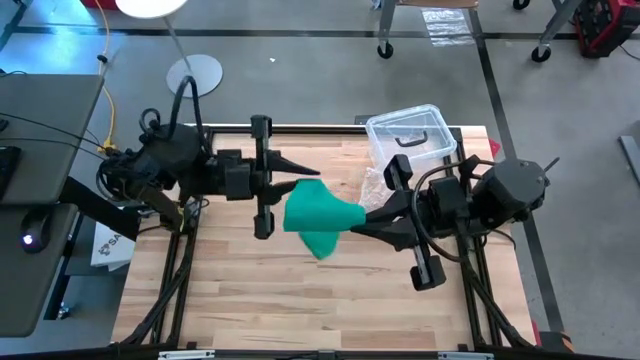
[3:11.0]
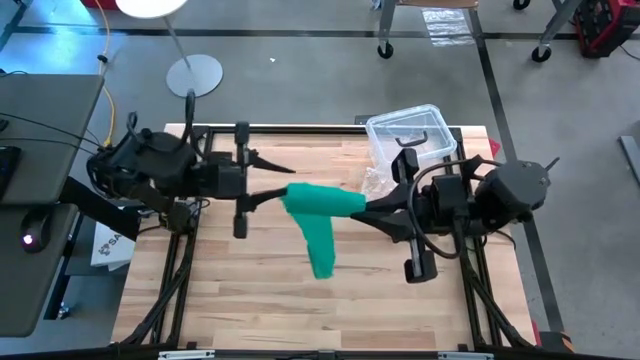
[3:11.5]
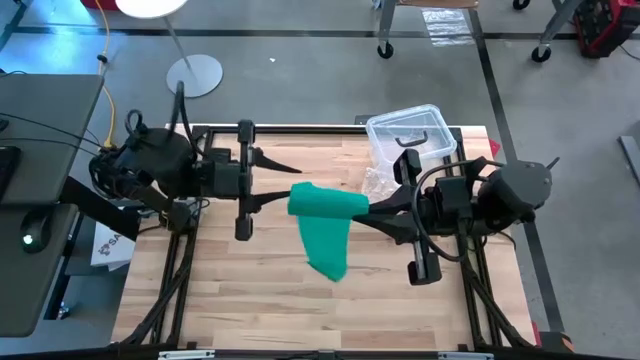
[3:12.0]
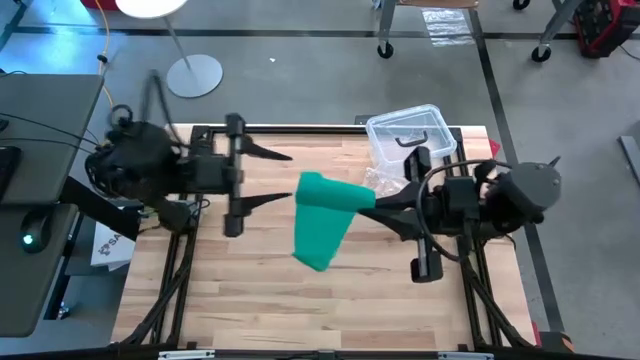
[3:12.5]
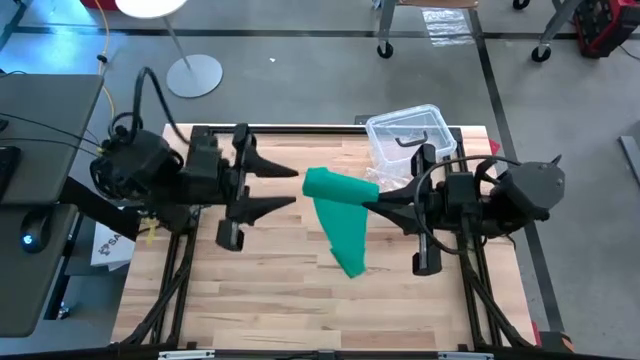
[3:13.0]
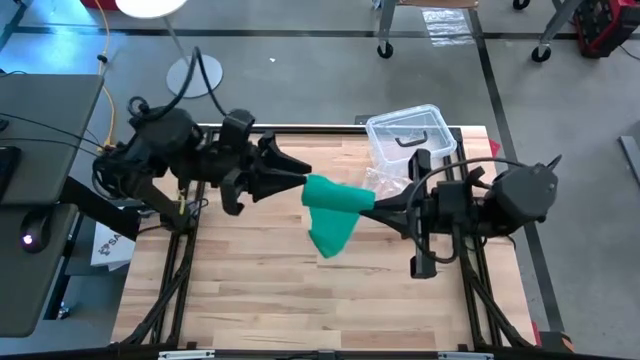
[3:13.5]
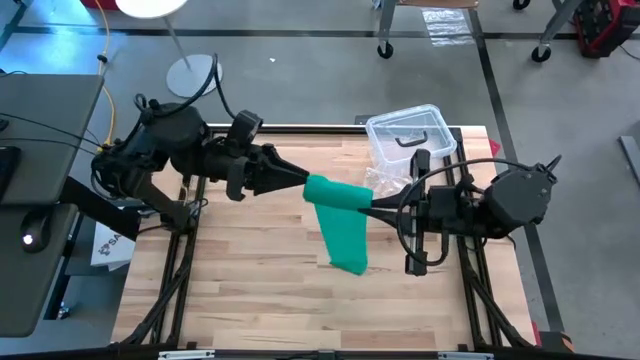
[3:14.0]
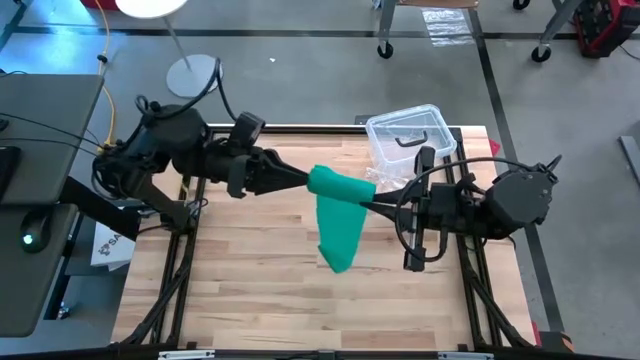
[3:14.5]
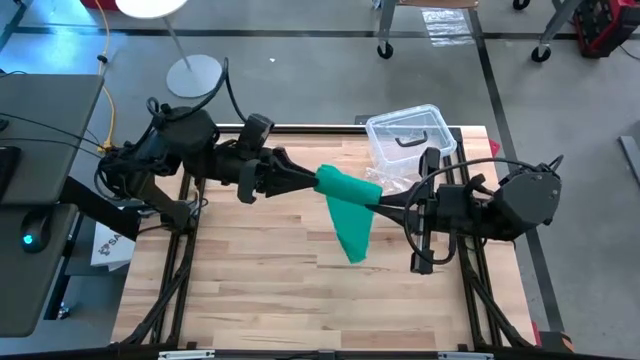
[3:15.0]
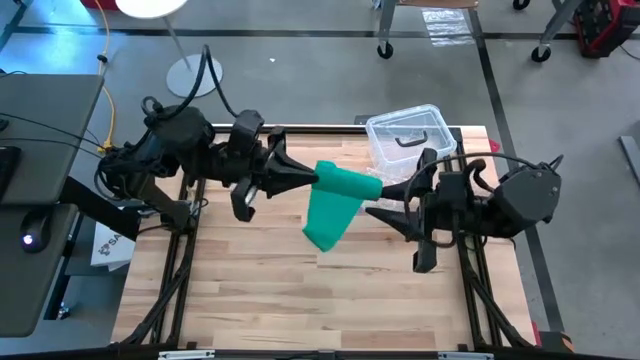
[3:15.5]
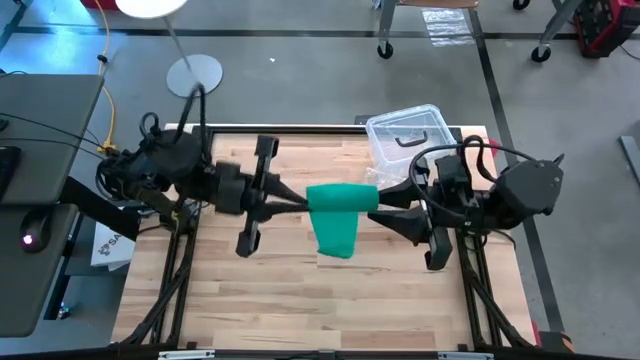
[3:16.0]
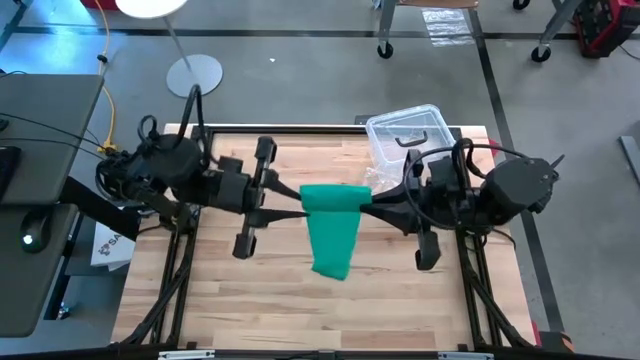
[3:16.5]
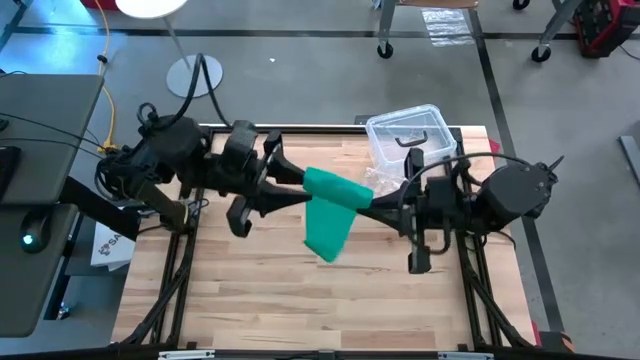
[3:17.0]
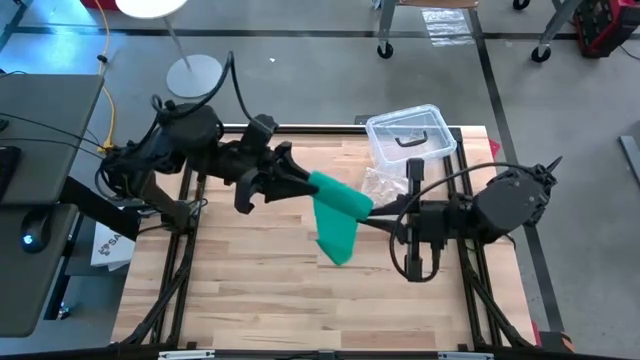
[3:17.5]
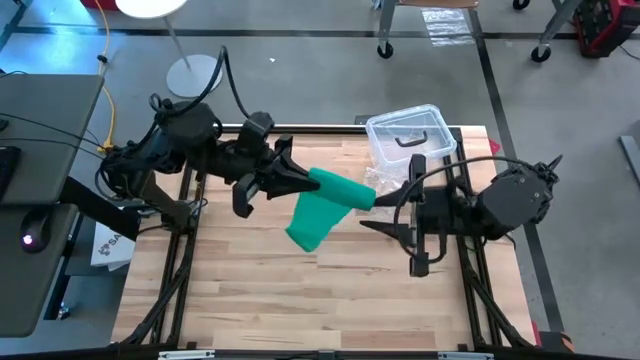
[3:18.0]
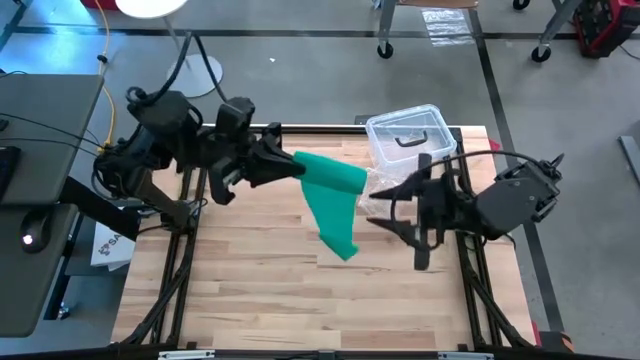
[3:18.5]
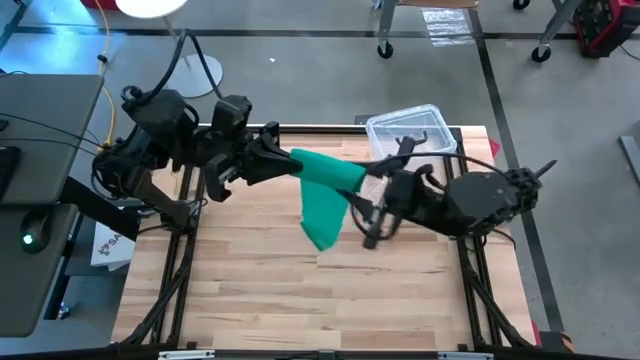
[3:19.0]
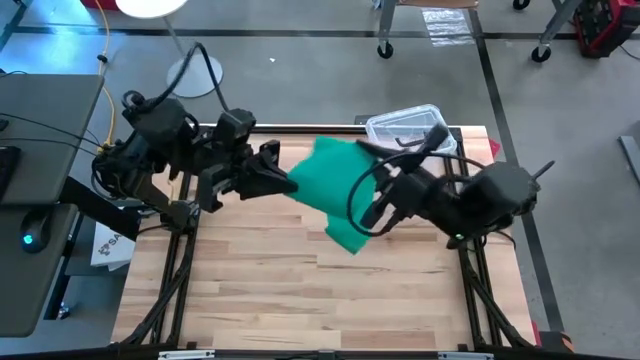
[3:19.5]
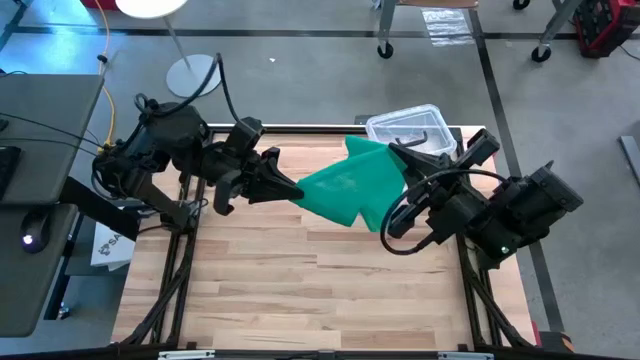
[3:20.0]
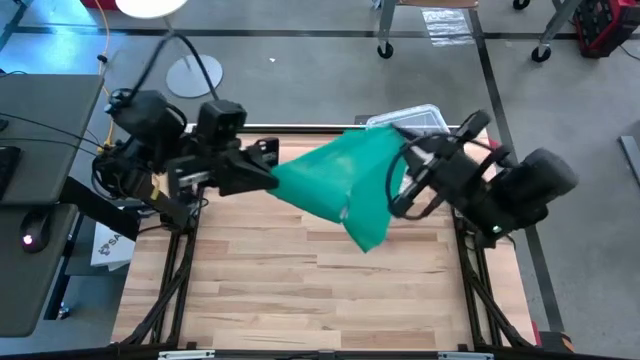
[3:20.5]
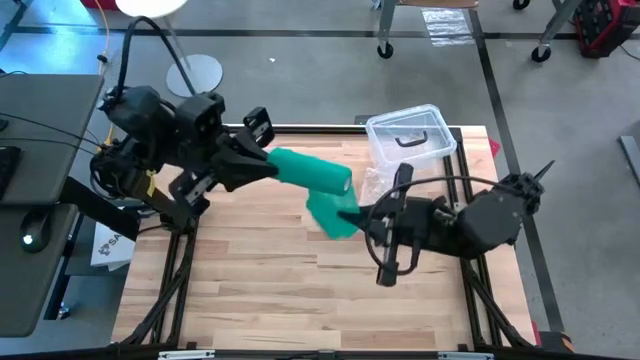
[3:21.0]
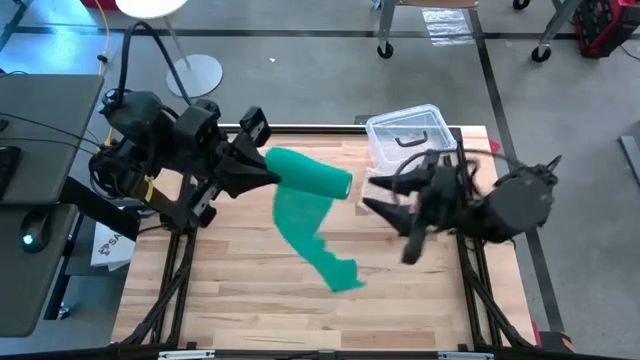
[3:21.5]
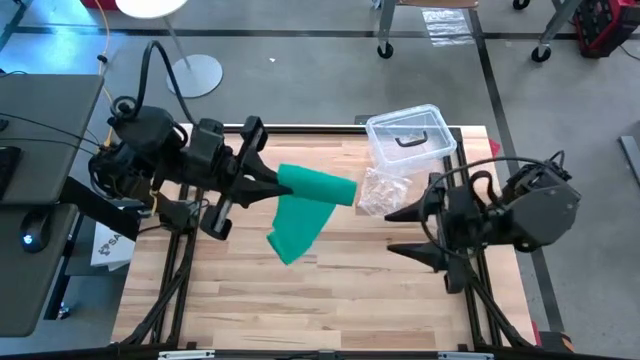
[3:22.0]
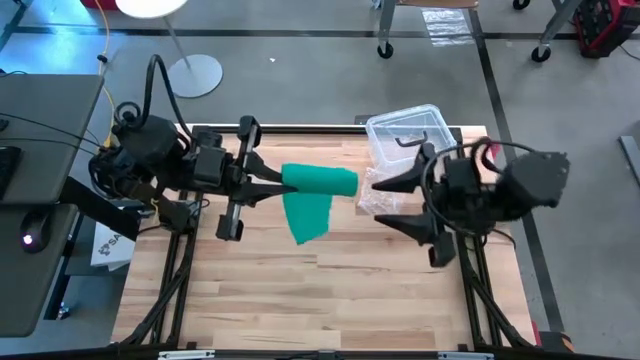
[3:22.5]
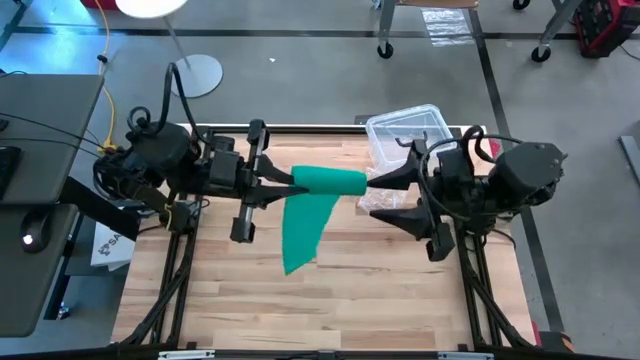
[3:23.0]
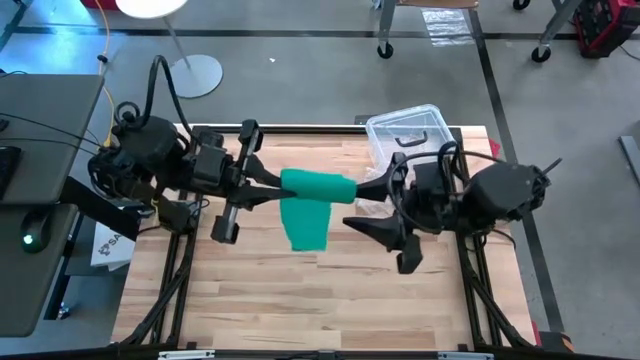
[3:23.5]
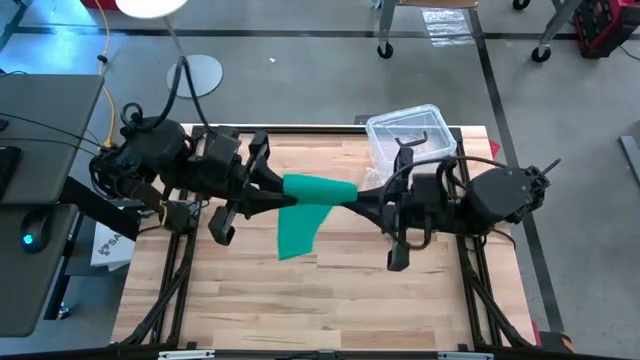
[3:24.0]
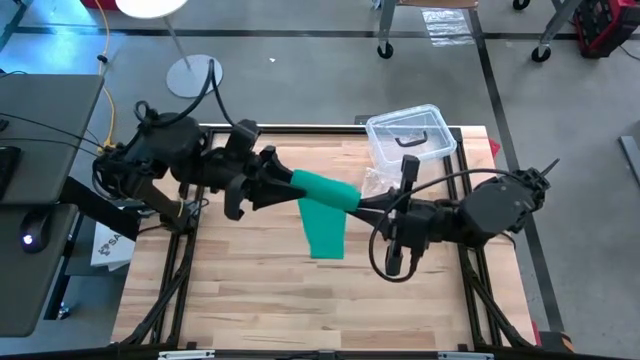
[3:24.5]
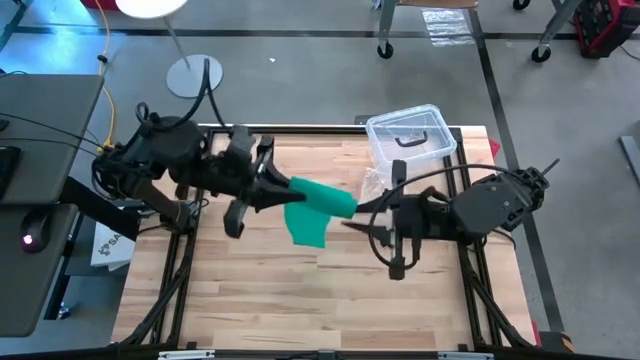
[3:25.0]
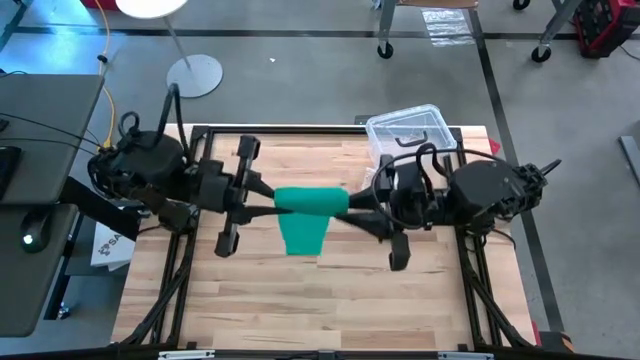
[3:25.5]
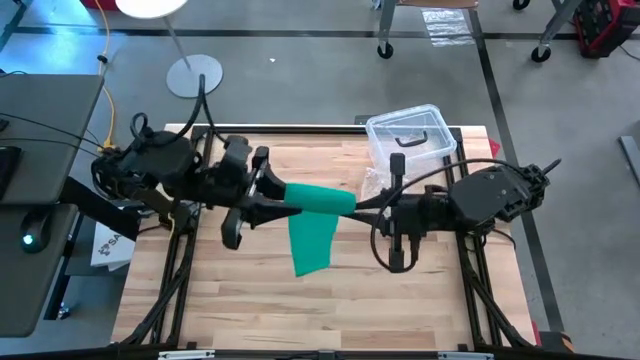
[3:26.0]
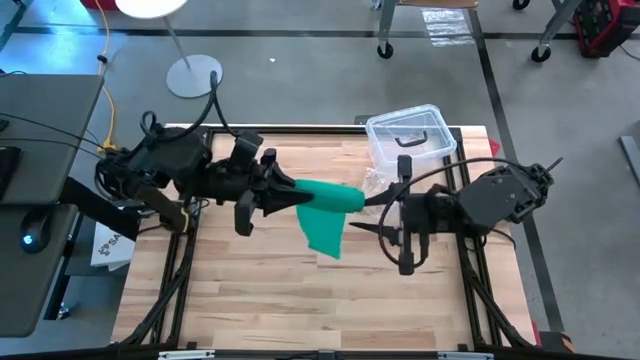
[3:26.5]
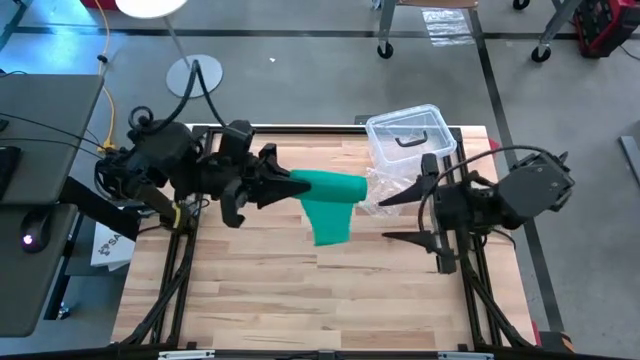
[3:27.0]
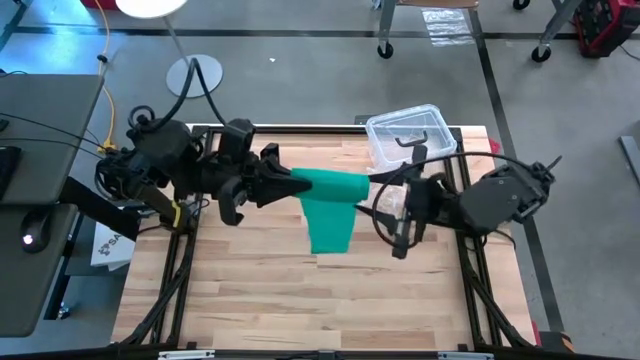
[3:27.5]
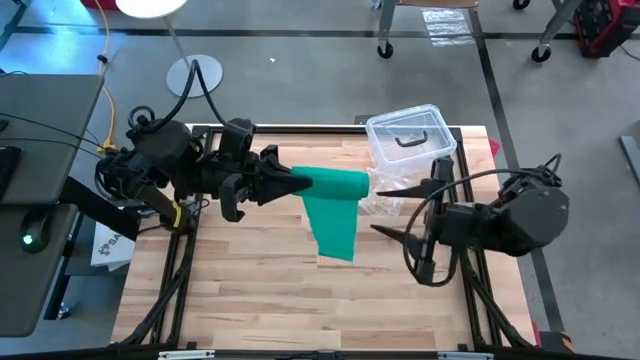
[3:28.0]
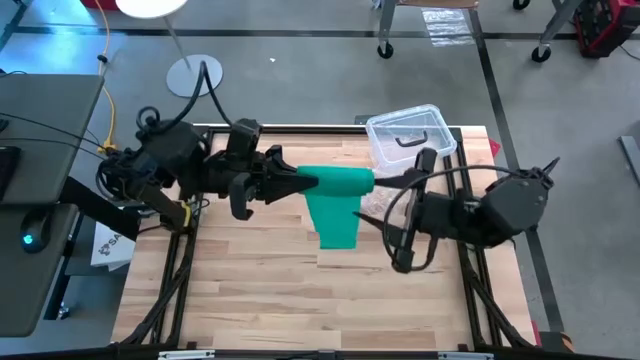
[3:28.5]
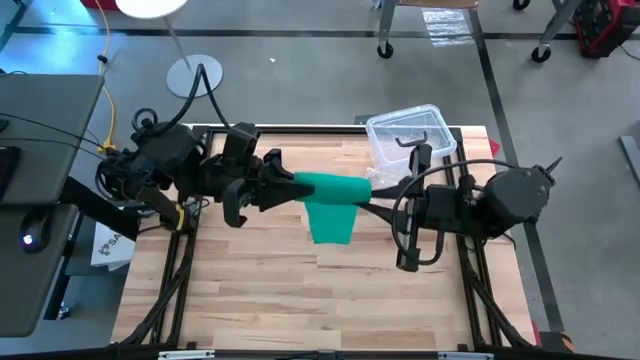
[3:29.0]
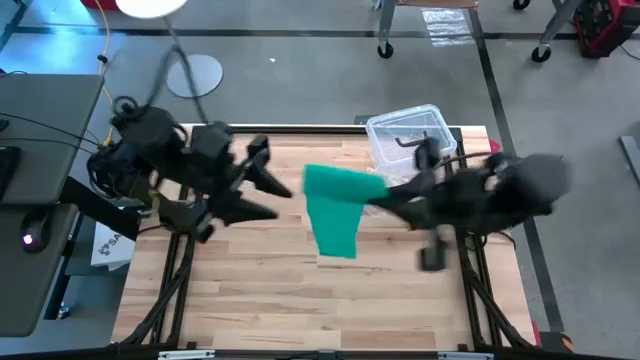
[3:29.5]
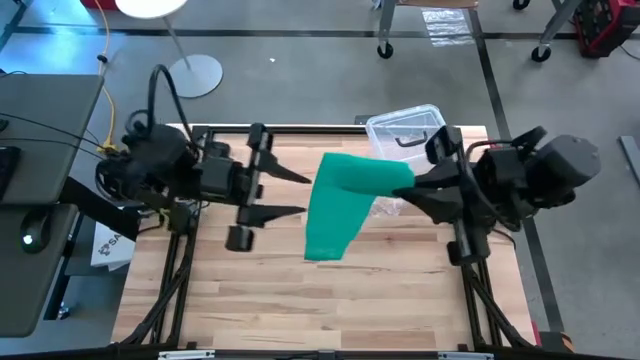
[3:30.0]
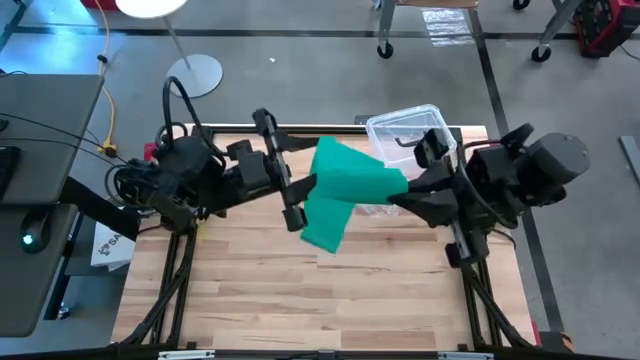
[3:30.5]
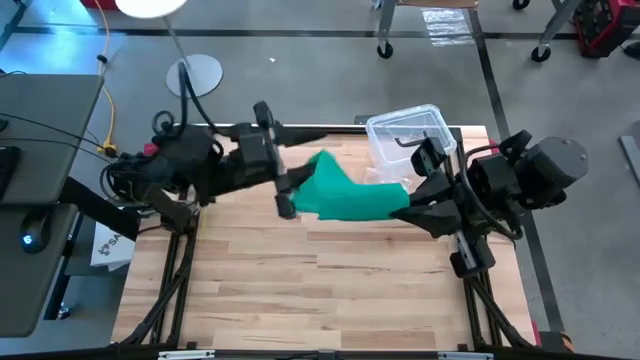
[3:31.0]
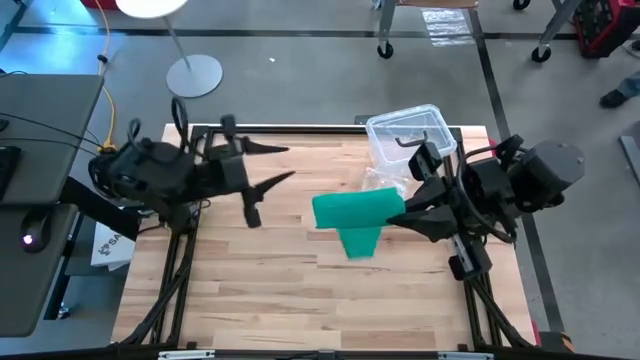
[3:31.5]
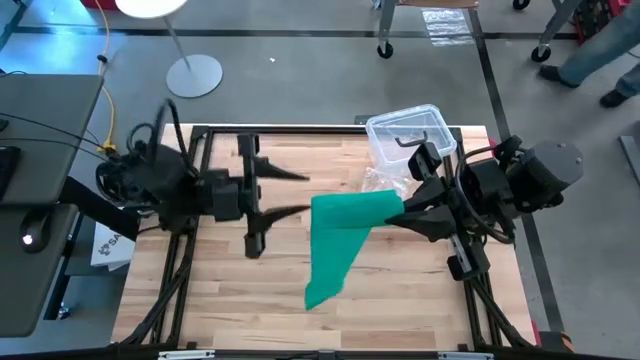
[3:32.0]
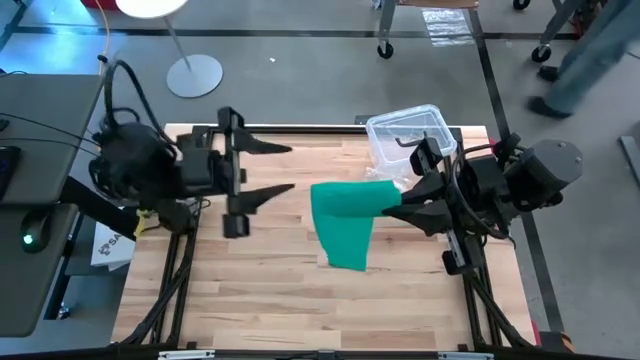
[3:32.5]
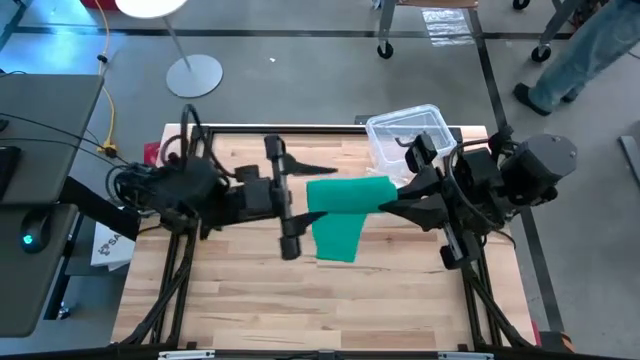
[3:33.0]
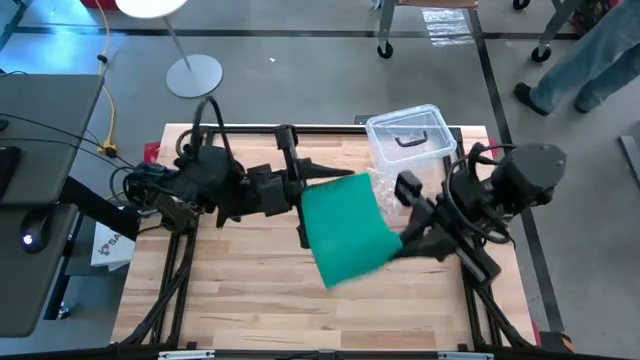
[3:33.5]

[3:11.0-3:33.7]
Task: Roll bandage
Roll the green bandage
